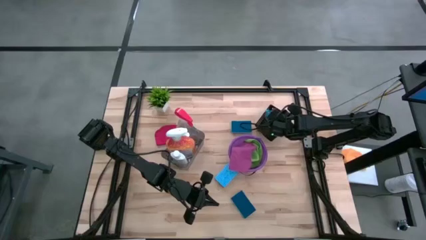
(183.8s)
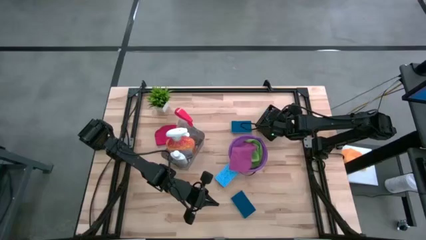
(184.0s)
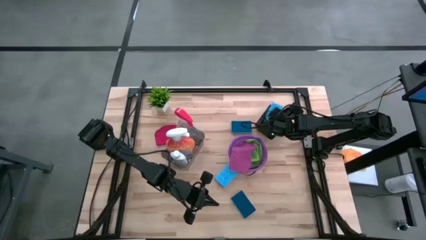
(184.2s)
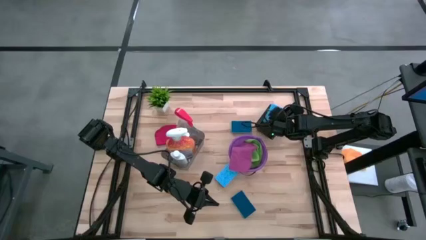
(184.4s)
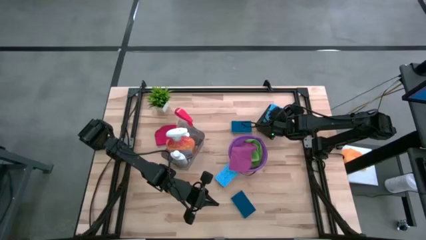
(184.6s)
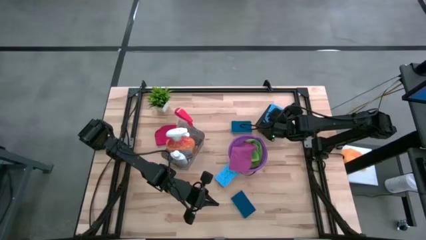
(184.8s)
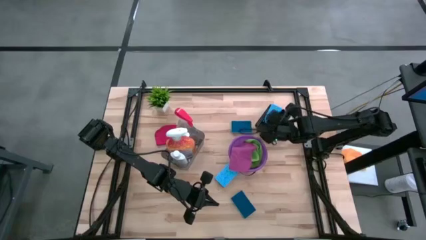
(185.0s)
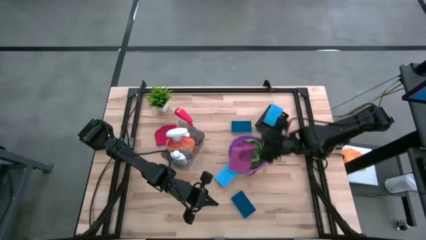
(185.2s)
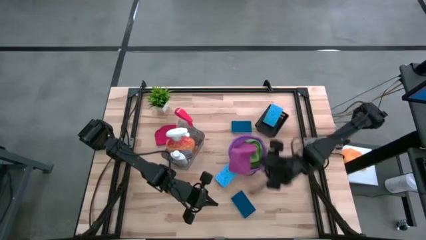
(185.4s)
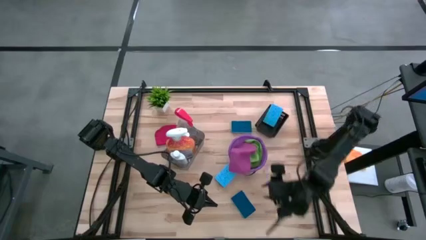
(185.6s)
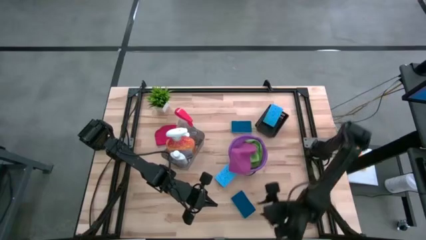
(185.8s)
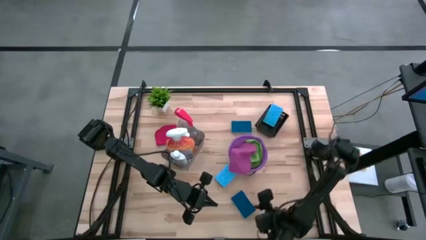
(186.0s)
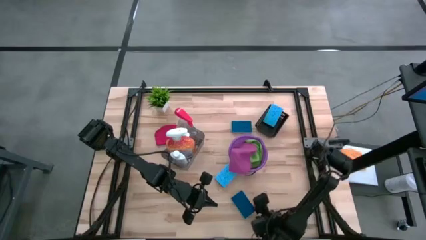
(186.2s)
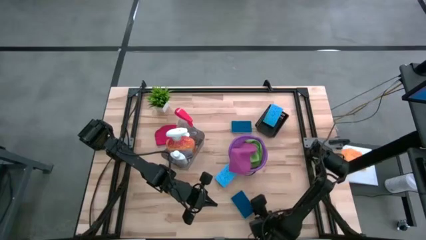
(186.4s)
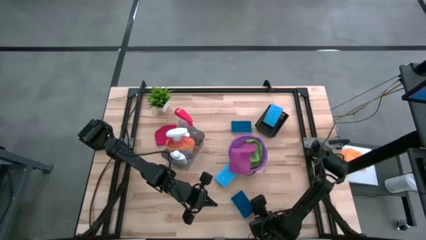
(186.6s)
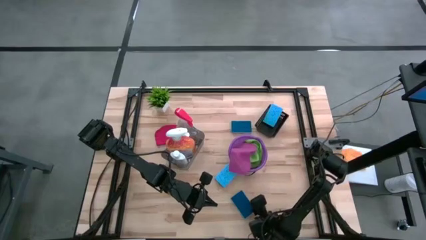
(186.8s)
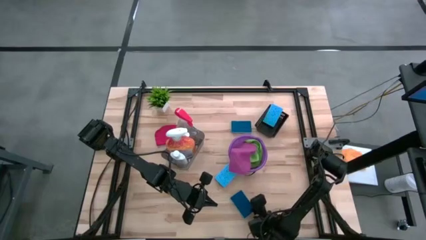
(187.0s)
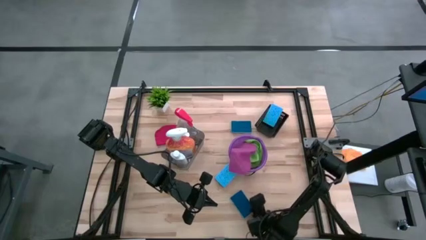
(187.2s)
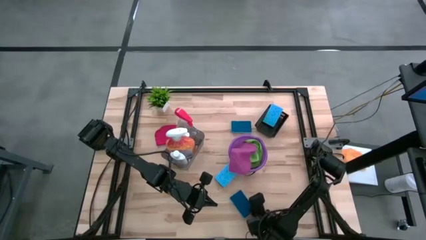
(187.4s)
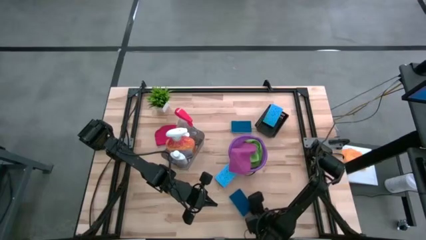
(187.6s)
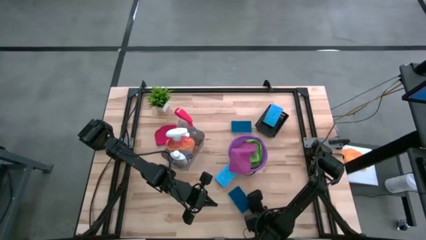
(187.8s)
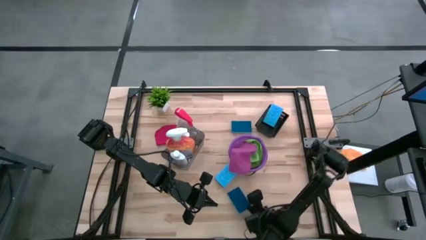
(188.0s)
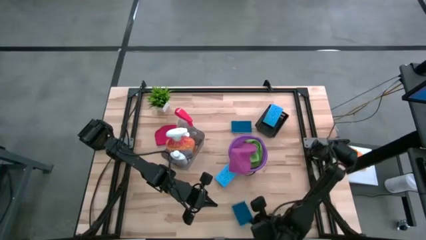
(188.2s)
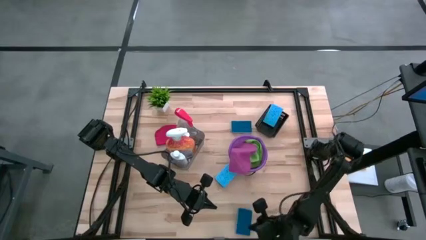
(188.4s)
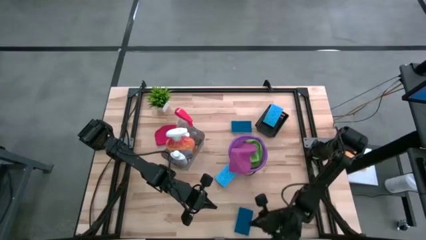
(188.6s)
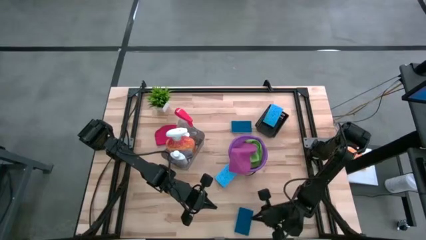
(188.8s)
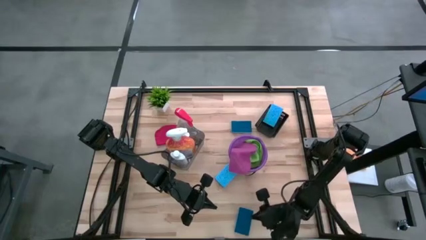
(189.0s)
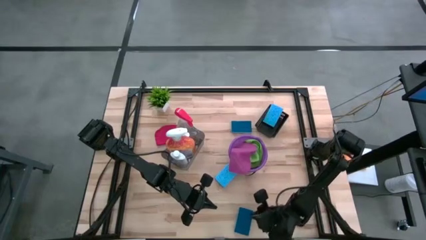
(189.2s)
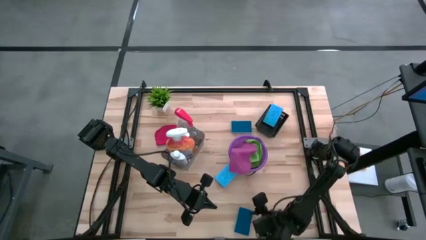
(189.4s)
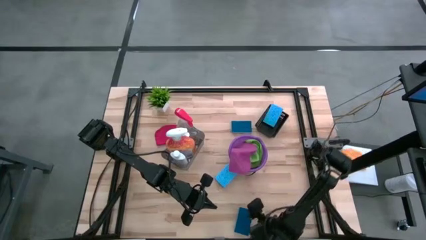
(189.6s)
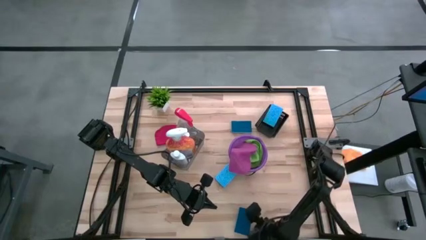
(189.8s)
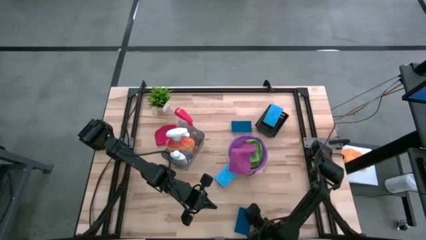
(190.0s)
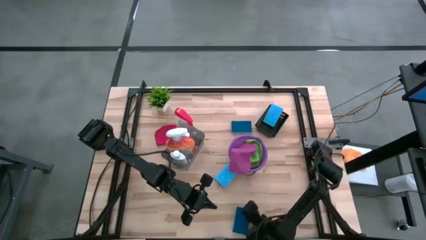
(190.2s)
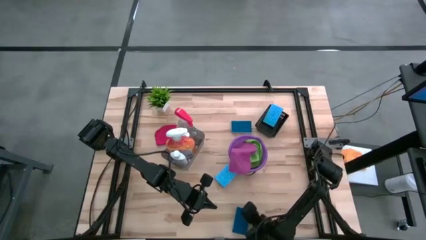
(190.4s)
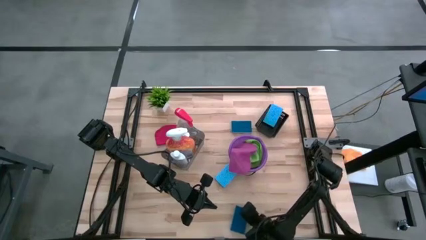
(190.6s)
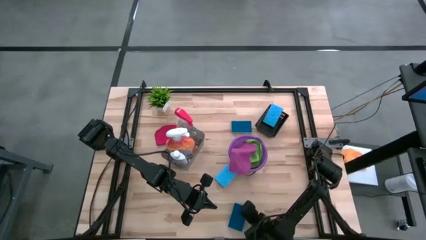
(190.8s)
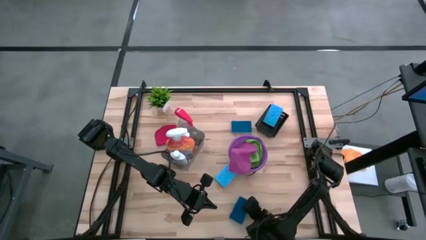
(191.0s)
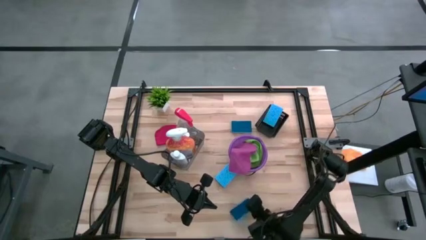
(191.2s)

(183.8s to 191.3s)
Task: Pick & Place Kitchen Items
Put the blue sponge wipe into the black bin

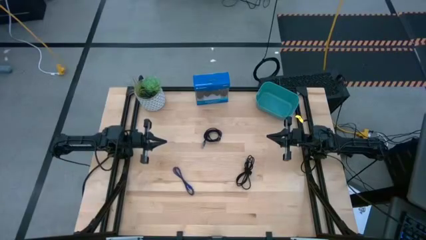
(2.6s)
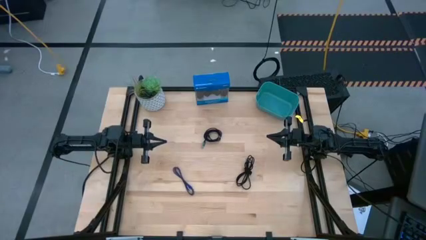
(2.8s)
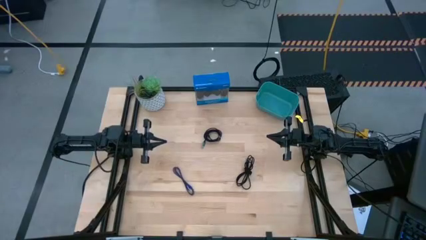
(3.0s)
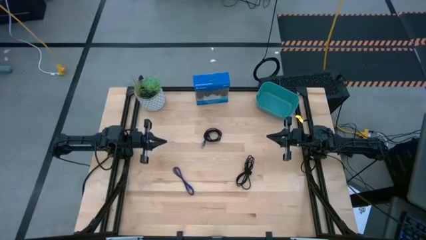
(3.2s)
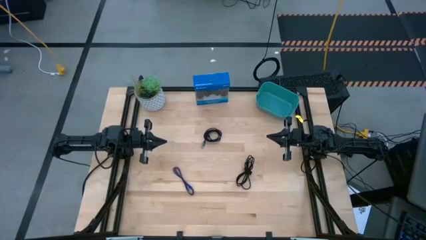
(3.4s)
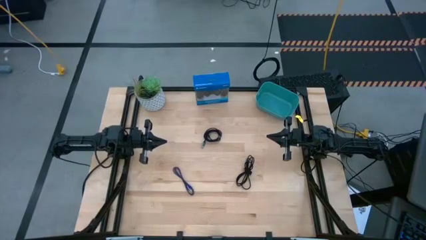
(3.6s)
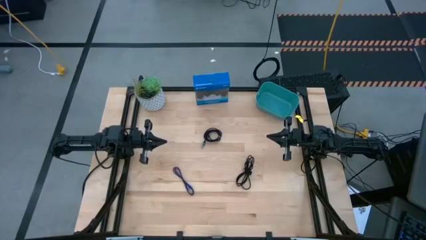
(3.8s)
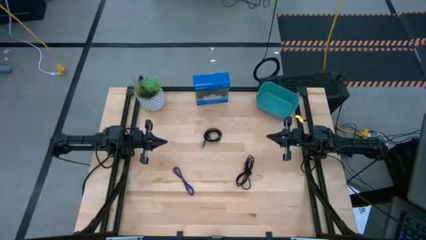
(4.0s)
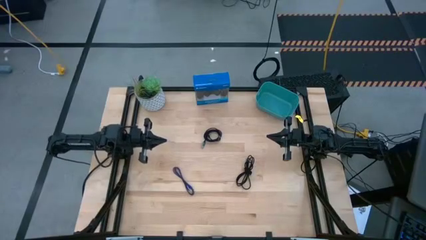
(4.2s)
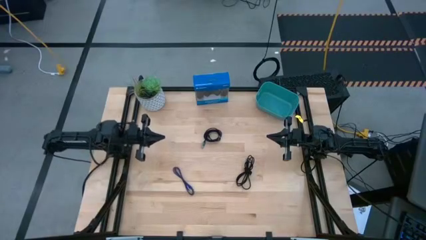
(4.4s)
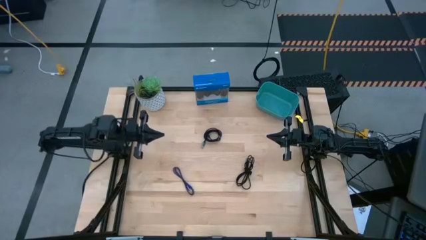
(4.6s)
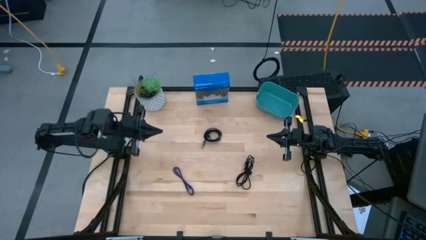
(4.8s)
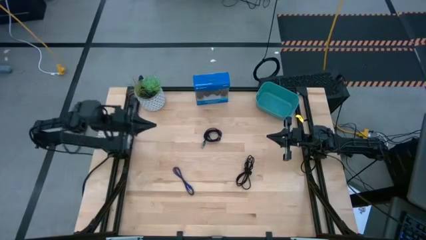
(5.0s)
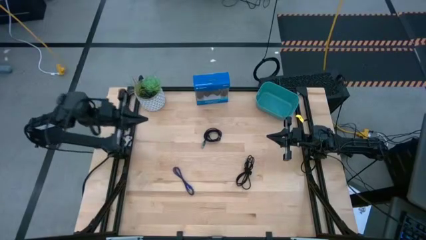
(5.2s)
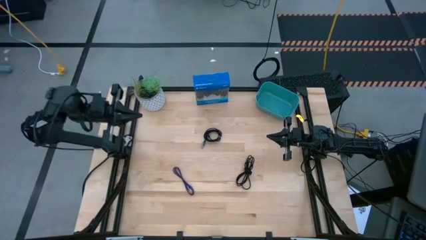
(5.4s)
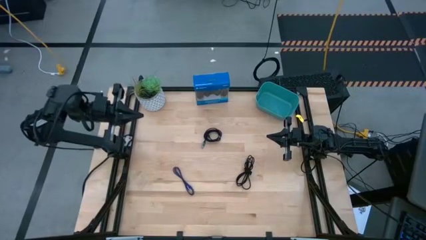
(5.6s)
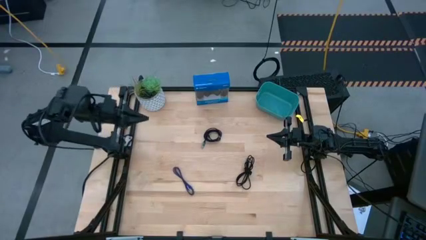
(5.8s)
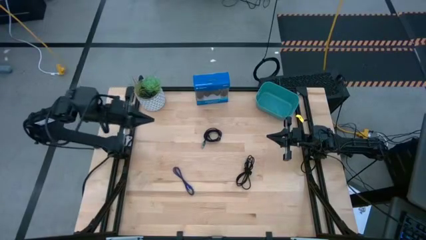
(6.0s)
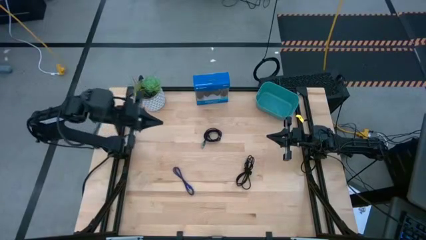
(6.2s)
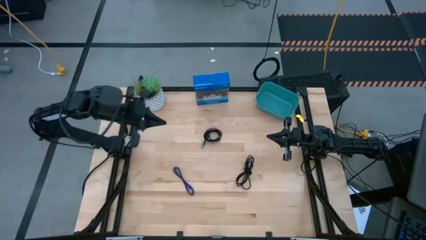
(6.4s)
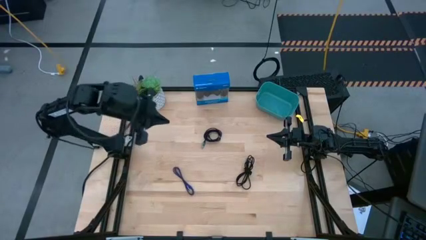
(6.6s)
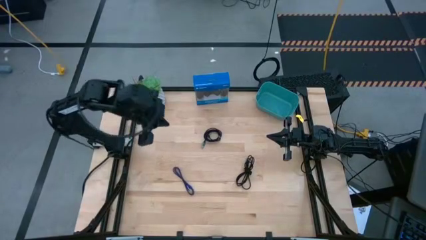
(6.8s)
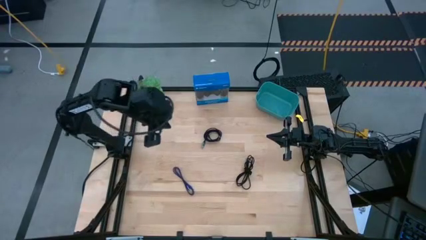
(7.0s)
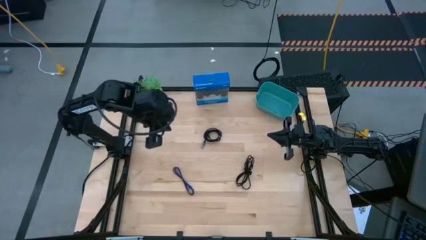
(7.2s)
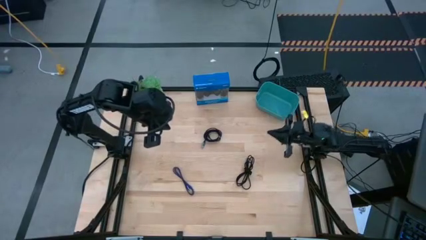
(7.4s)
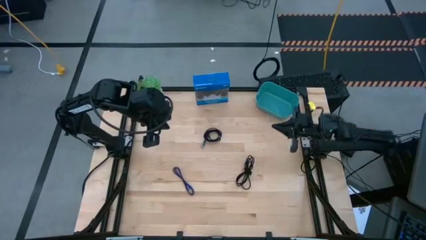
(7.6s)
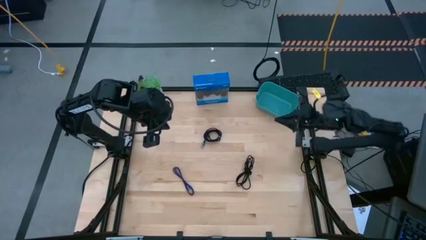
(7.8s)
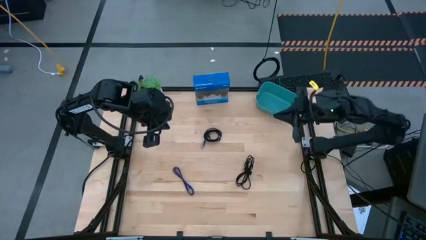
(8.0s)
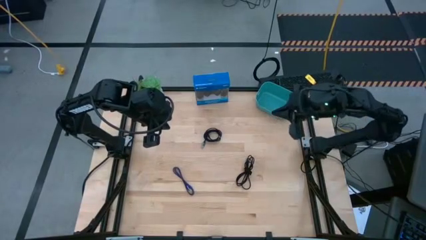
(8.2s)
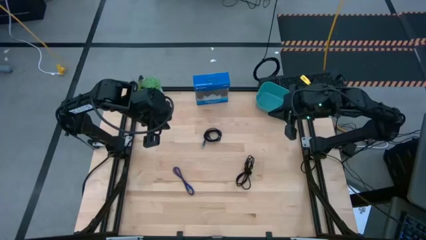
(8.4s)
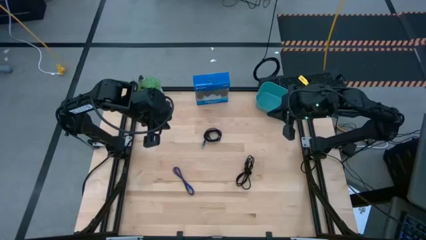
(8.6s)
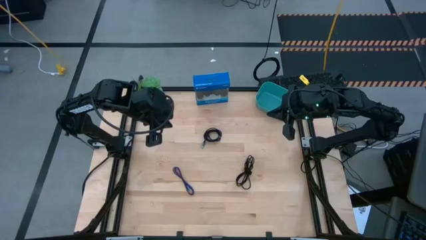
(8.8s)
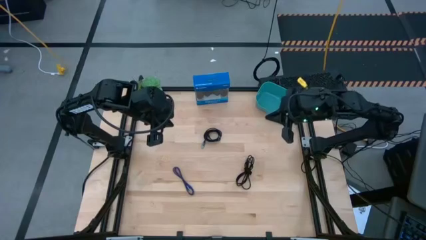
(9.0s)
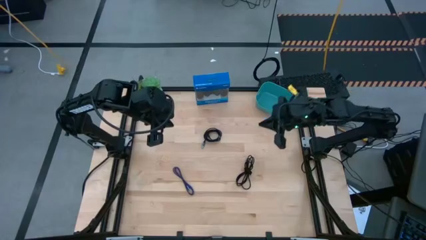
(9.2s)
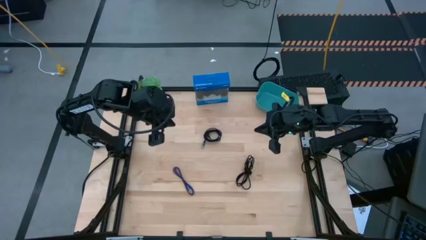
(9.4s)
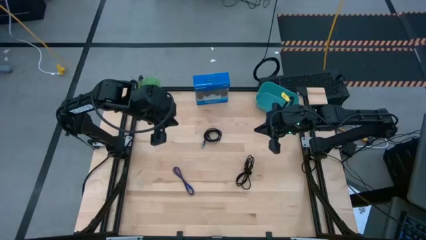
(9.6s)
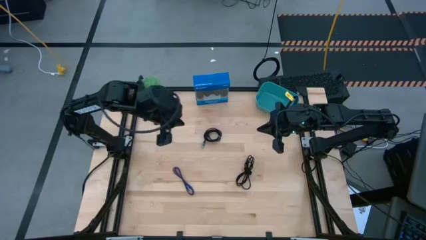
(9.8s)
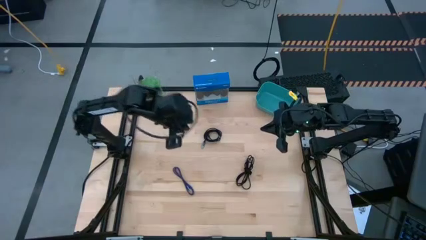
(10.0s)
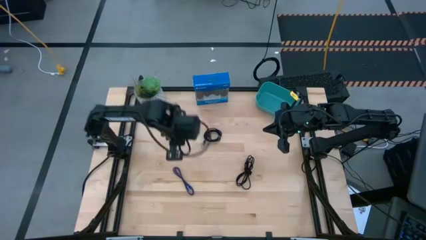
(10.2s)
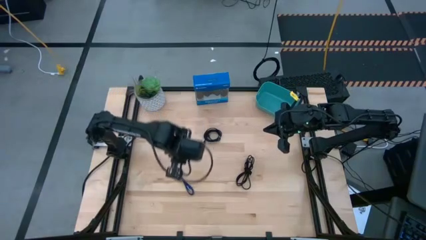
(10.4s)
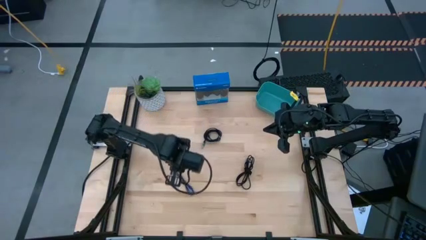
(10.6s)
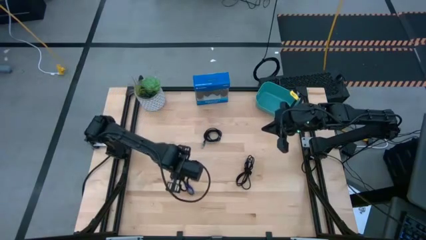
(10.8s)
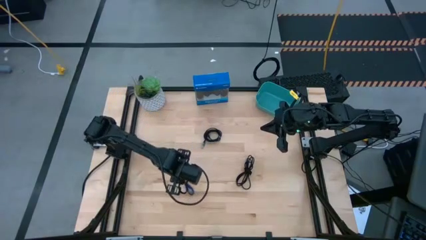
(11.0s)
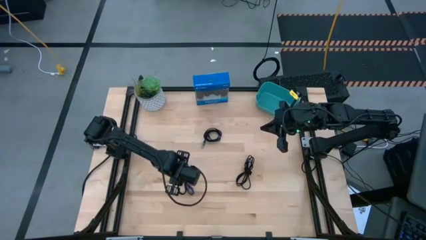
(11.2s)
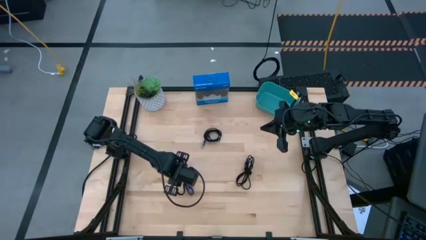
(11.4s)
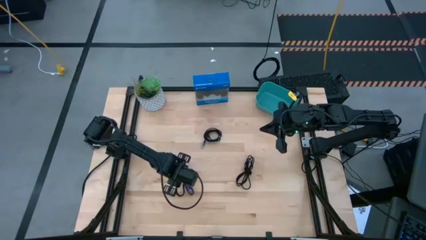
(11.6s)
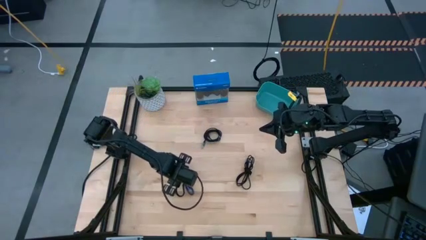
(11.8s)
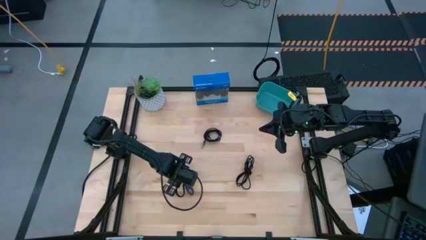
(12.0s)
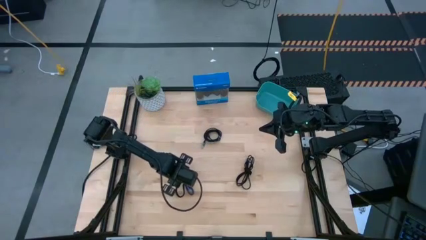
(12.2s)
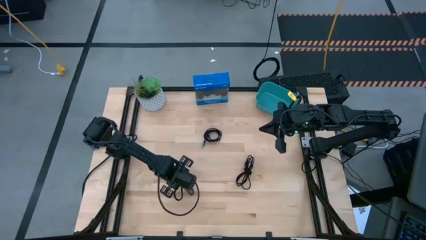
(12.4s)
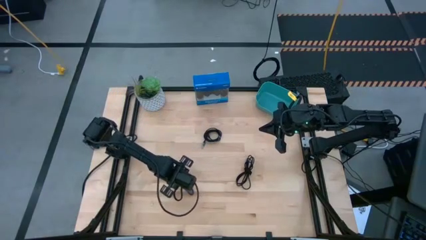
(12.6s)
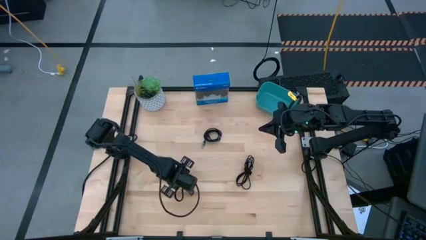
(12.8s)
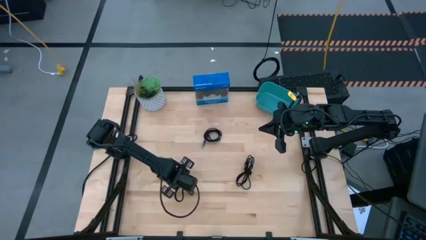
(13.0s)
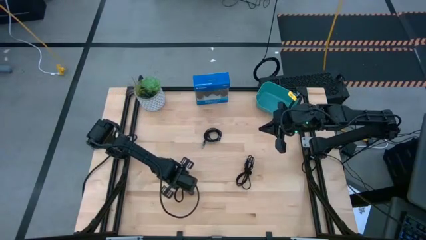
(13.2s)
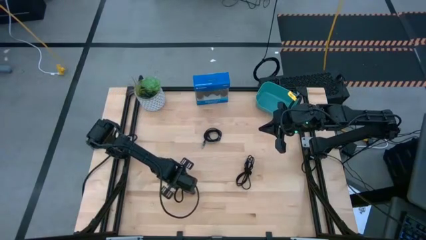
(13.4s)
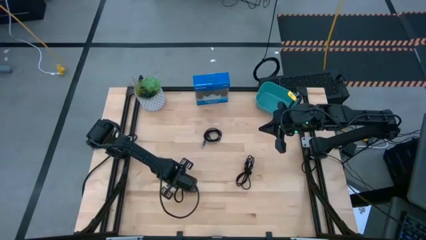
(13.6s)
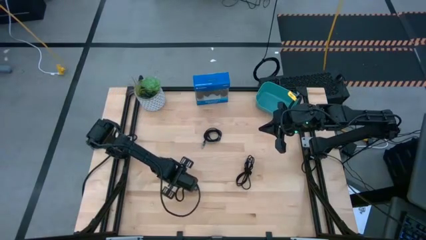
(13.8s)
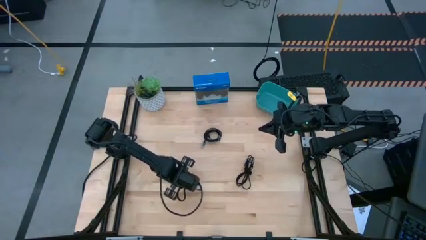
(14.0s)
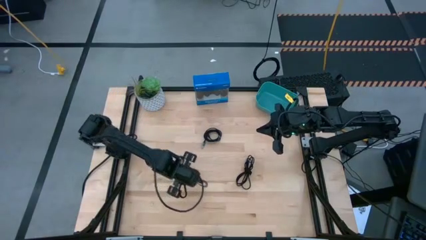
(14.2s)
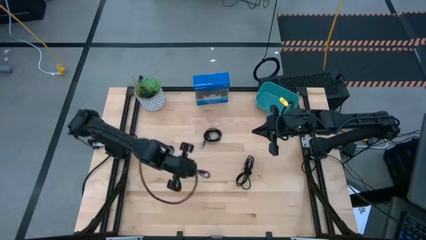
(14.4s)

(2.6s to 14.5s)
Task: Pick and place USB-C Cables
Put the violet charger cable into the green bin
